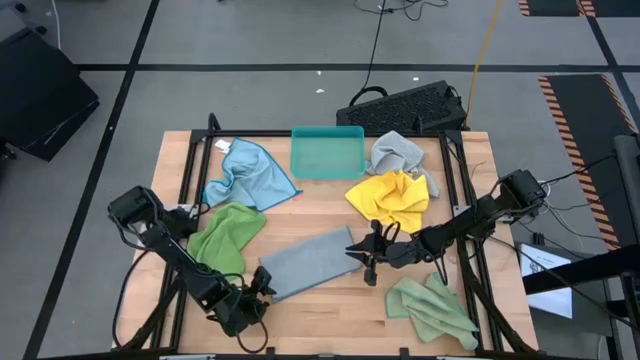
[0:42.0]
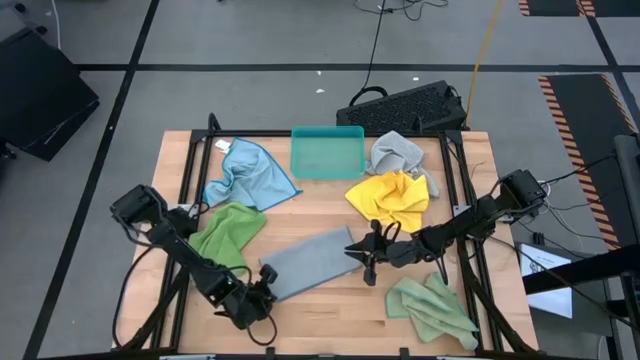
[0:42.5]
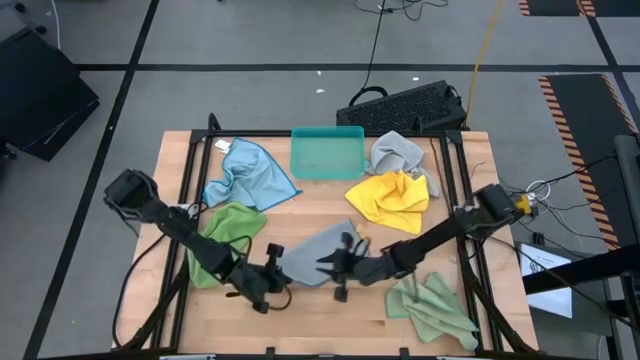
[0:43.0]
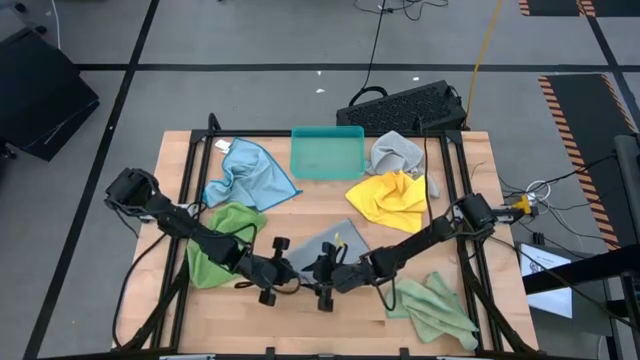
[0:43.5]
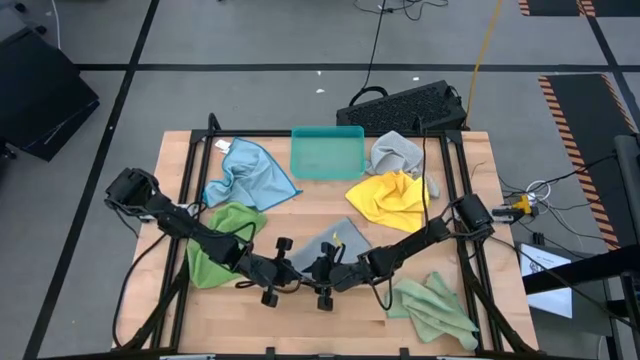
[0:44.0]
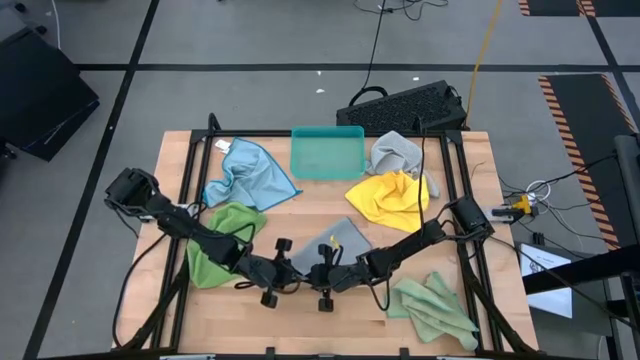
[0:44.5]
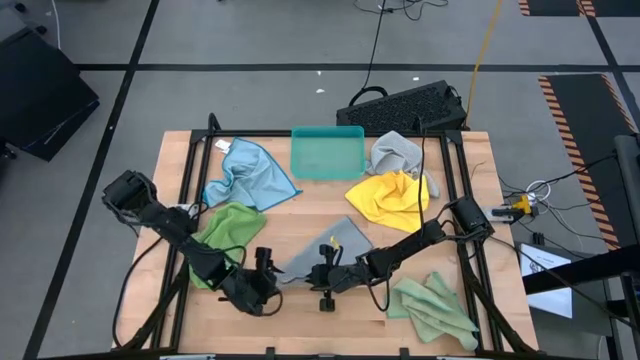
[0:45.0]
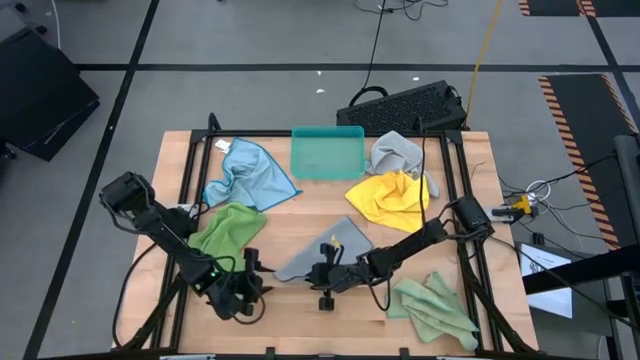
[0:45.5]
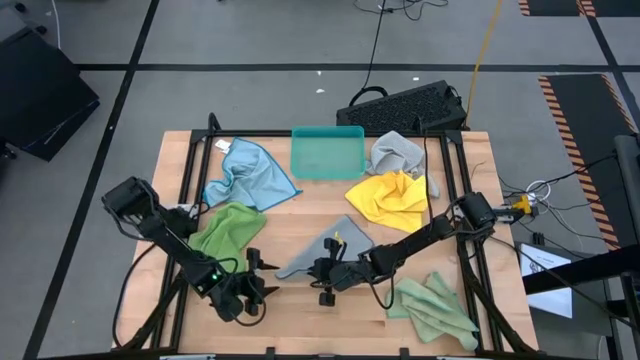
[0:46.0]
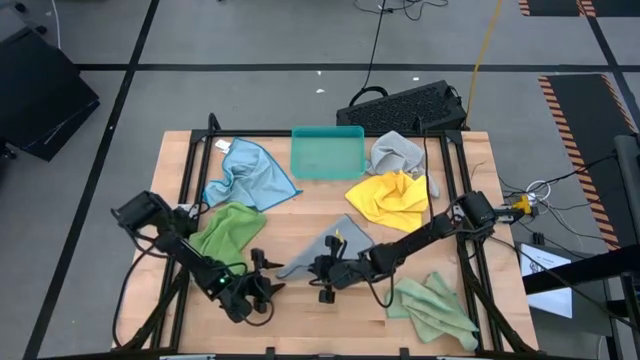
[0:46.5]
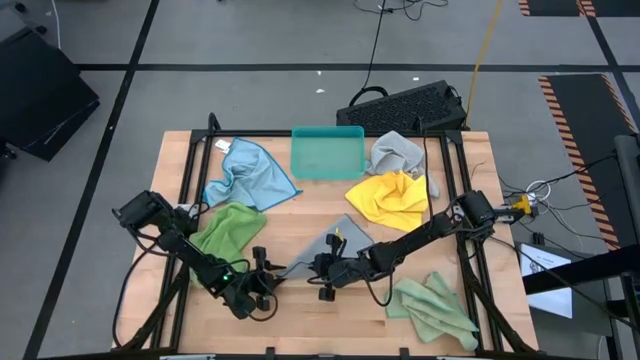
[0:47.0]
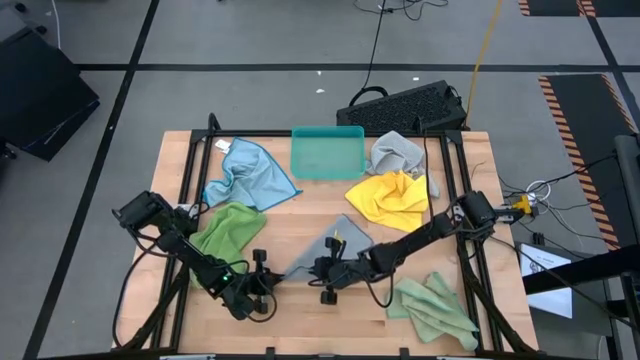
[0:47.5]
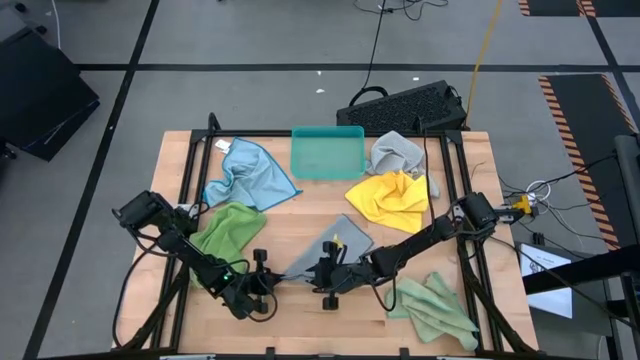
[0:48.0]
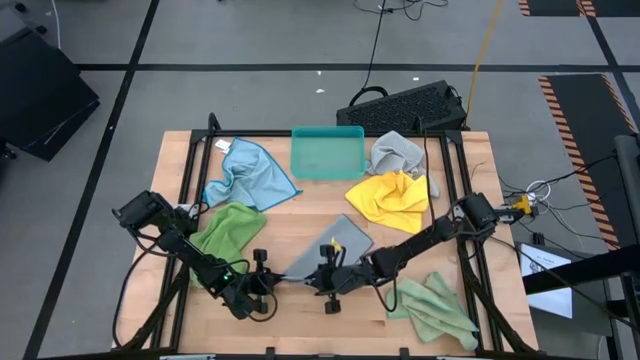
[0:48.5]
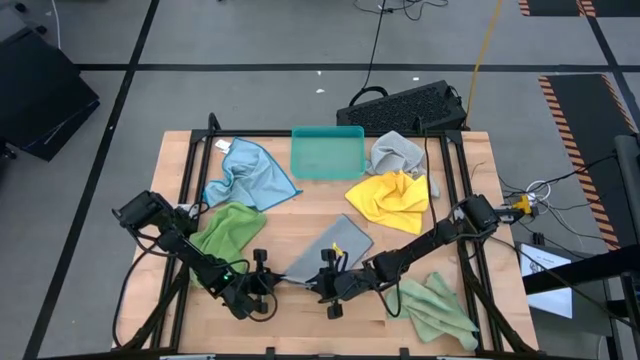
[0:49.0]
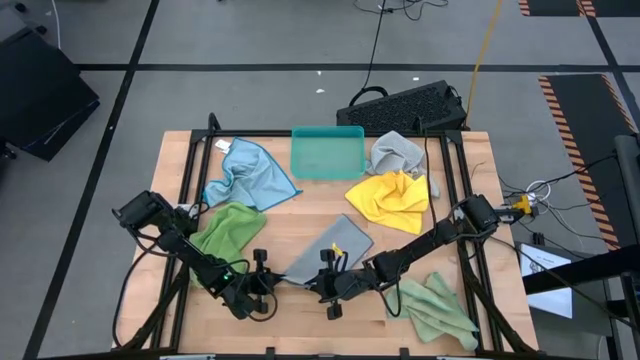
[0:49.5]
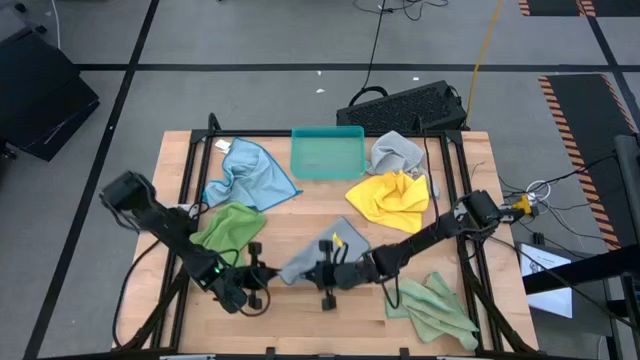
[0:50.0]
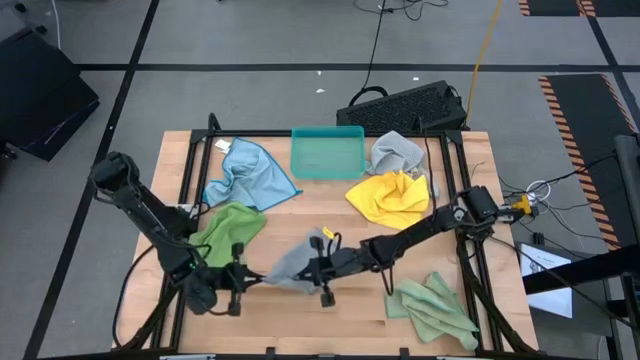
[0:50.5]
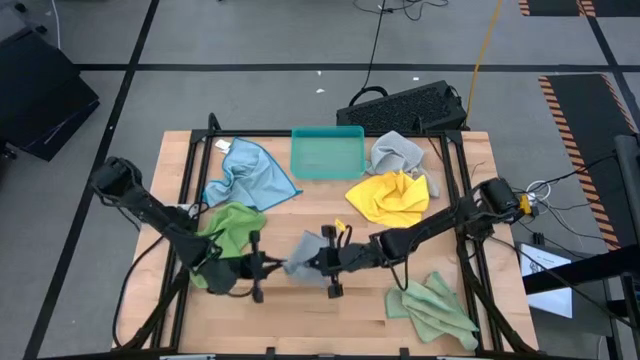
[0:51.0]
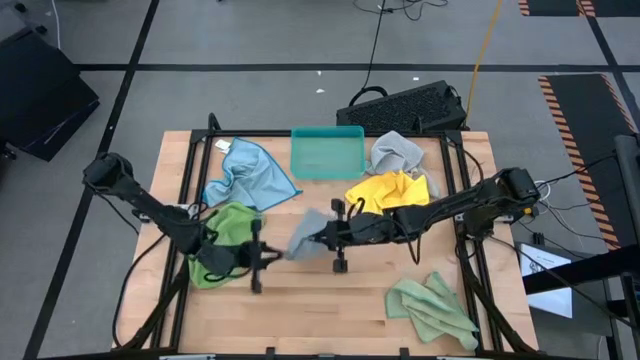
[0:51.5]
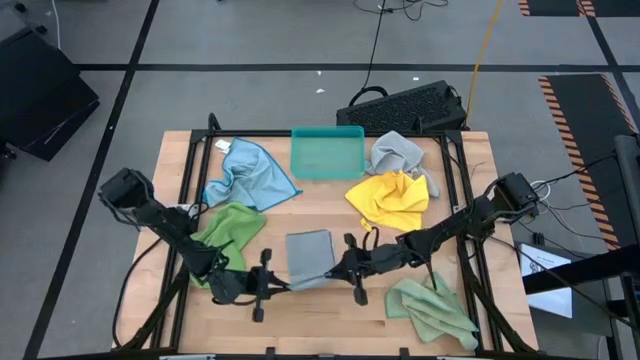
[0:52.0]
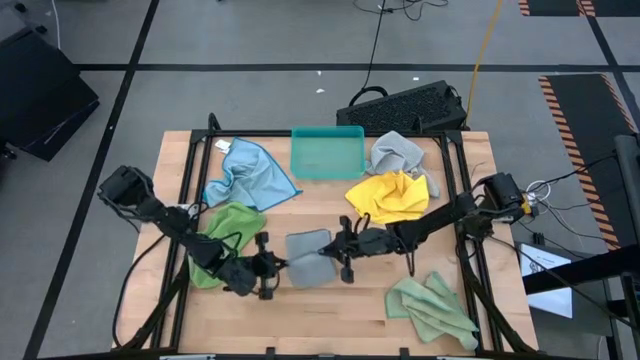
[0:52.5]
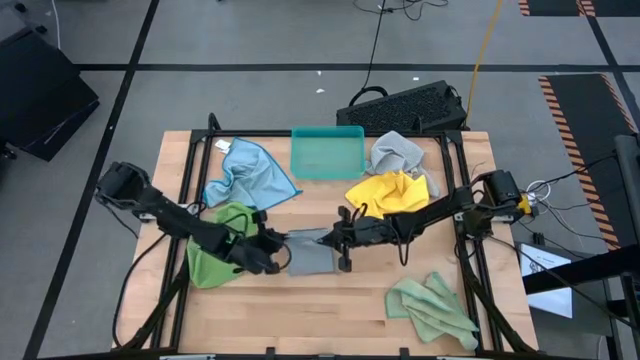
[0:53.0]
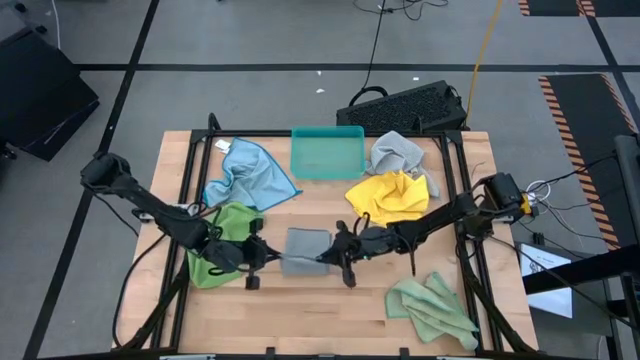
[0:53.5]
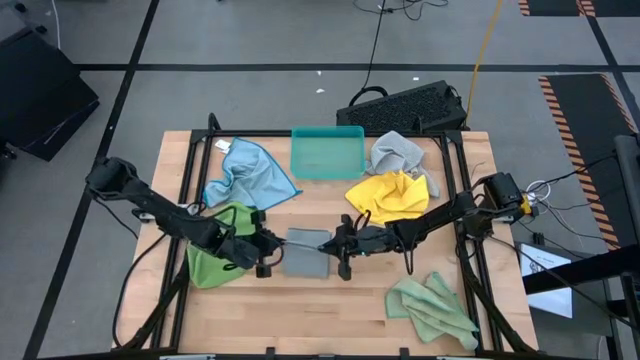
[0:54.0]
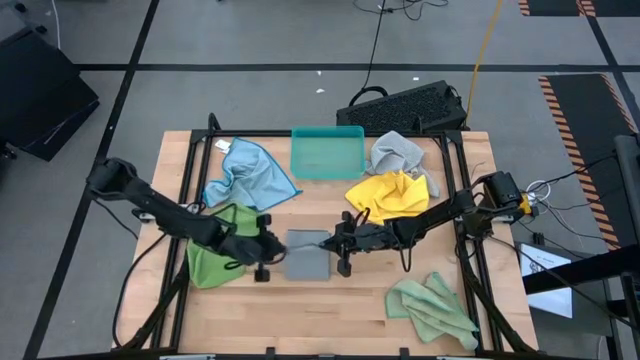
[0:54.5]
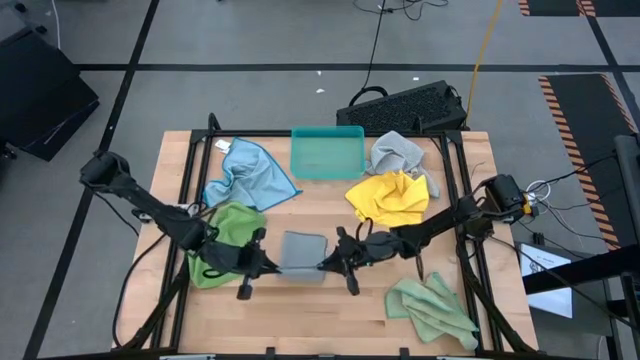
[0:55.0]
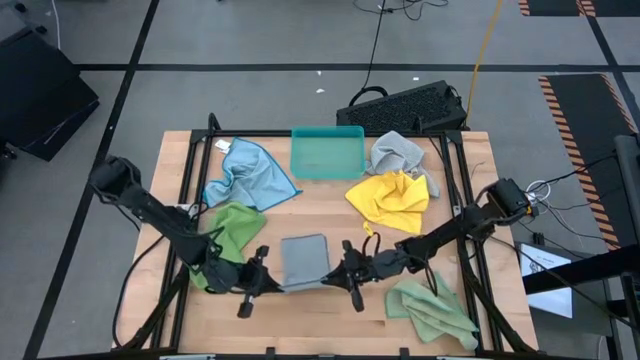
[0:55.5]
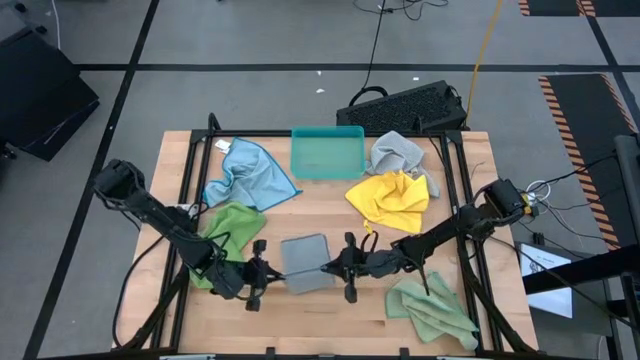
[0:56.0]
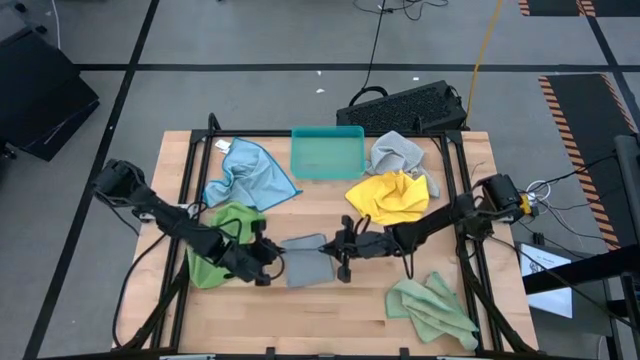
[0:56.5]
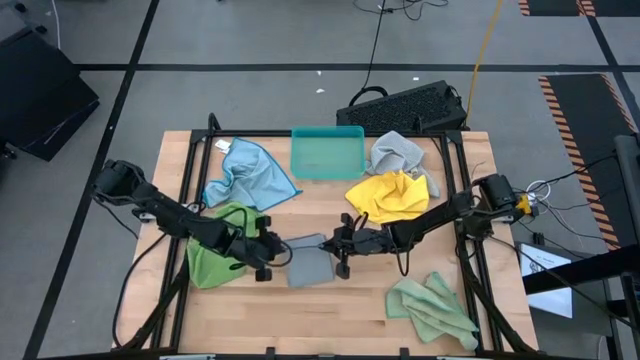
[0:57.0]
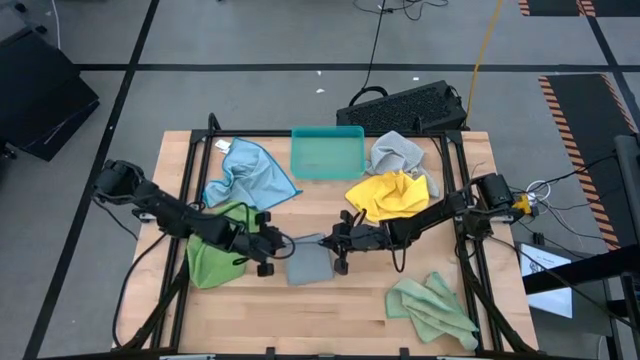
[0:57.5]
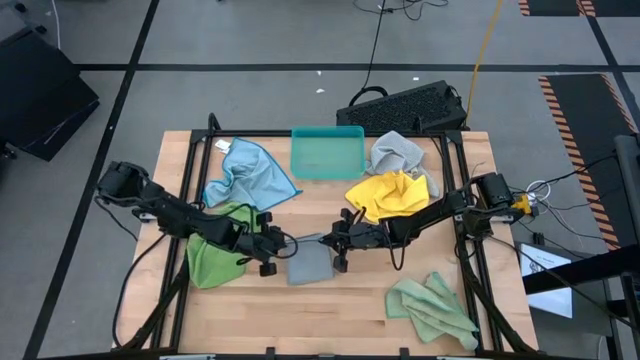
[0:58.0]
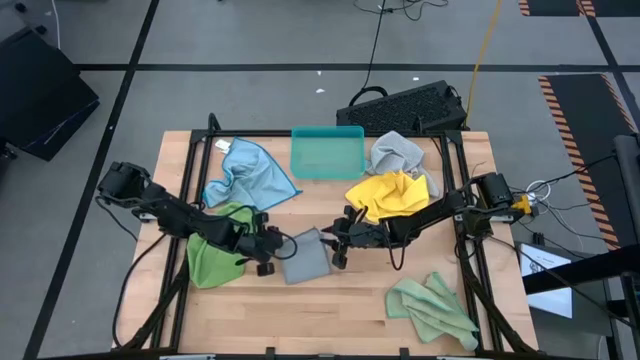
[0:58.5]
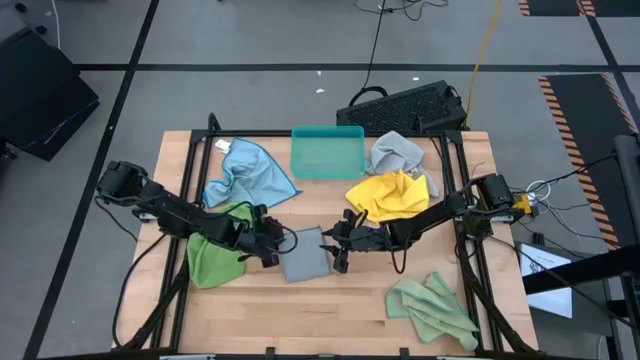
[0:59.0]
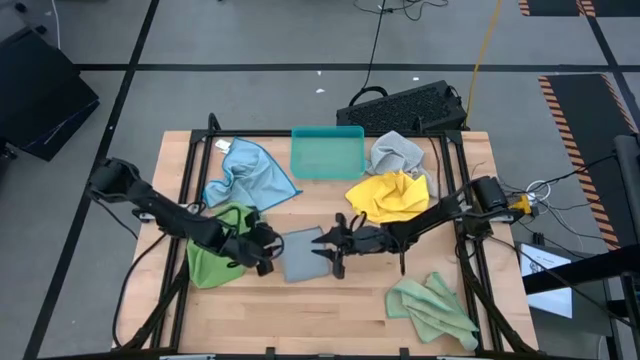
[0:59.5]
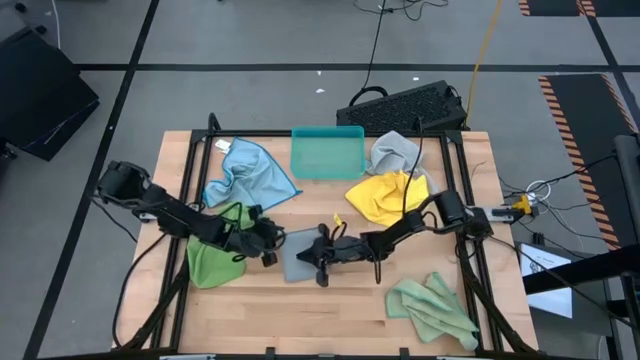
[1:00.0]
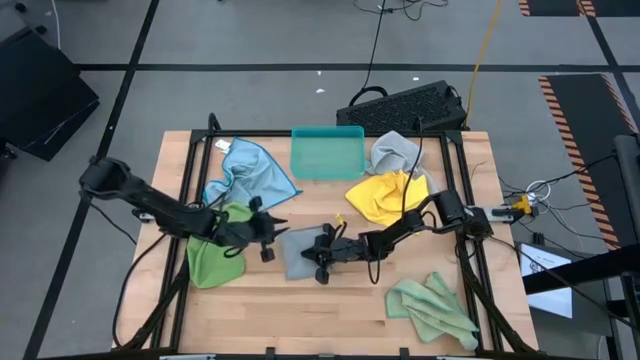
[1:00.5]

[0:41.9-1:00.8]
Task: Fold microfiber towels
Fold the dark gray microfiber cloth

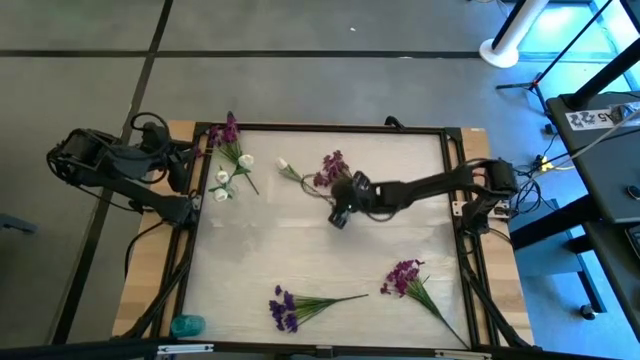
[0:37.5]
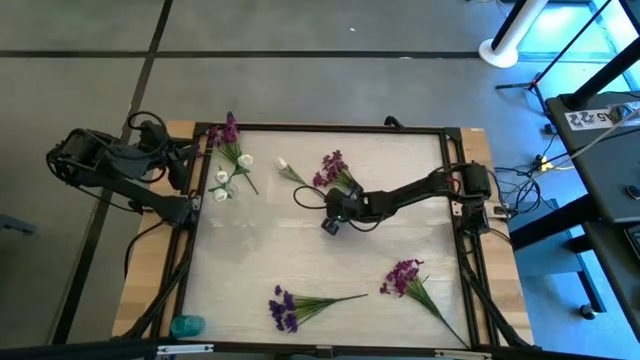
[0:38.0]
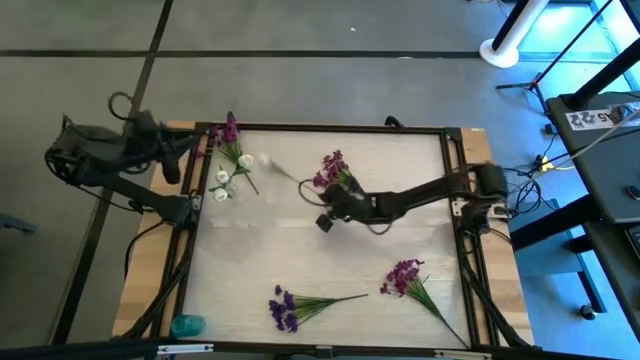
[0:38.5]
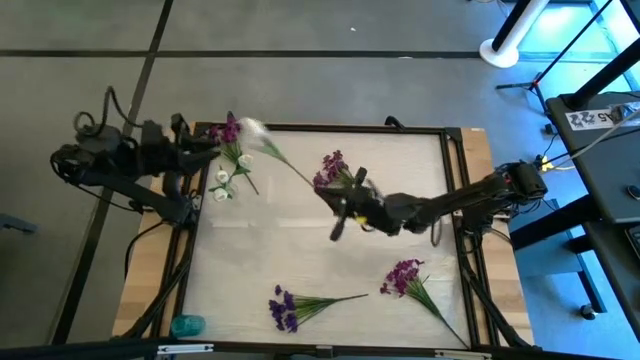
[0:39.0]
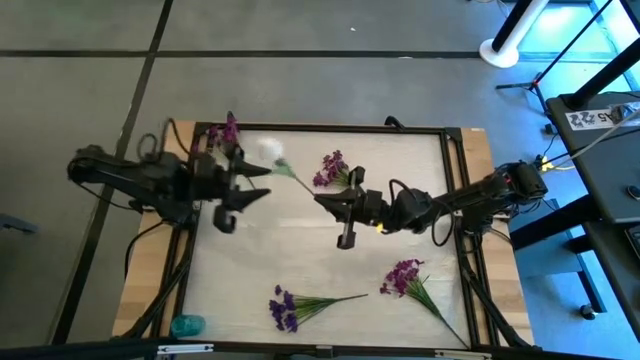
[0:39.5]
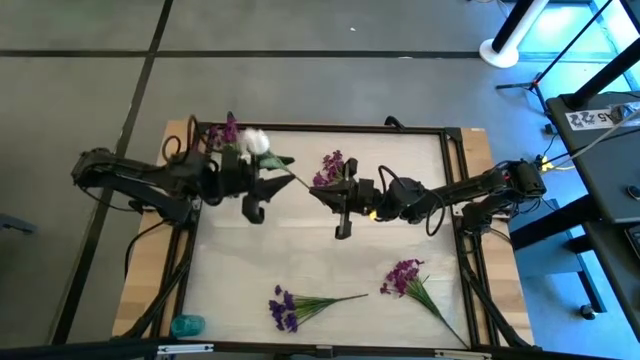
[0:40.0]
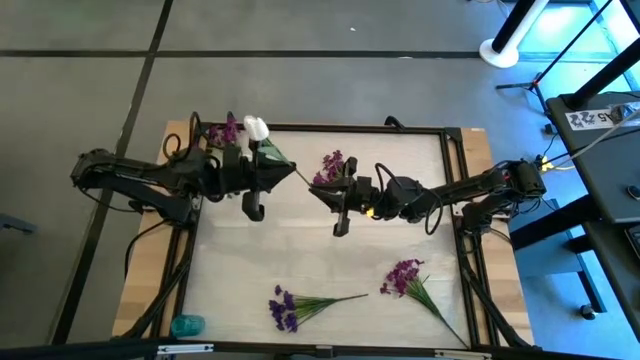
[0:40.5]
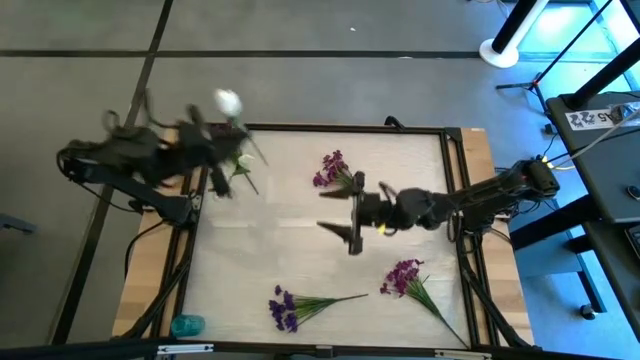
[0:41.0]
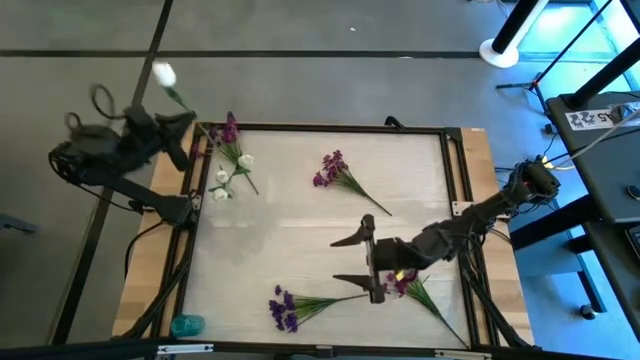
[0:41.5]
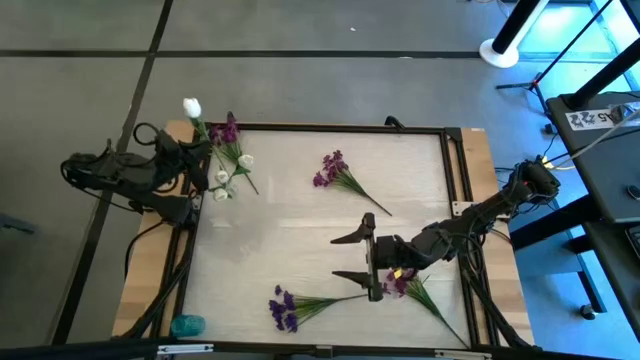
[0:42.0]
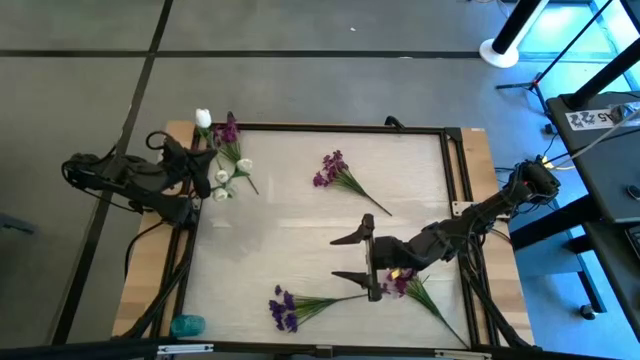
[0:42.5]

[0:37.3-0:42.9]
Task: Sort flowers into vase by color
Put the white flower into the transparent vase
